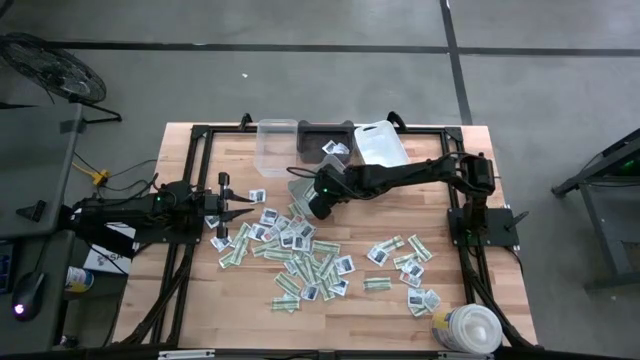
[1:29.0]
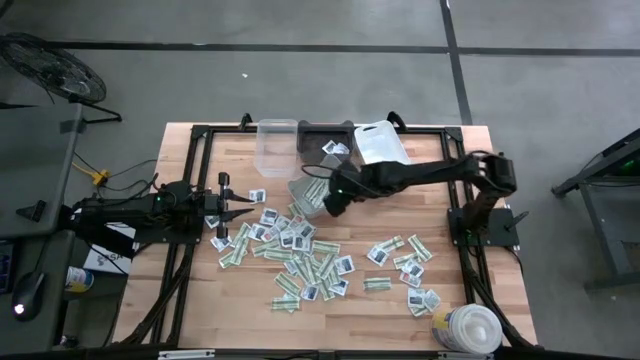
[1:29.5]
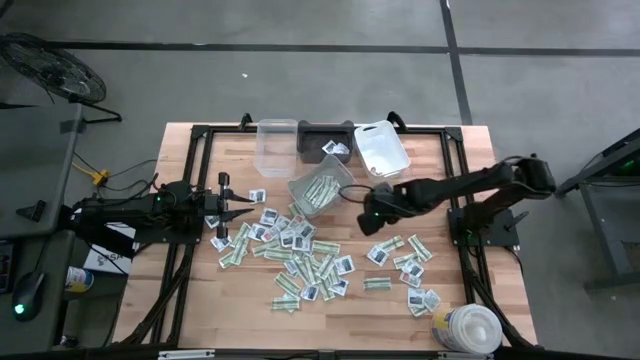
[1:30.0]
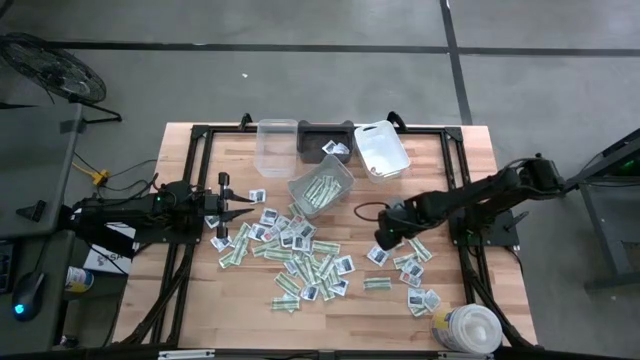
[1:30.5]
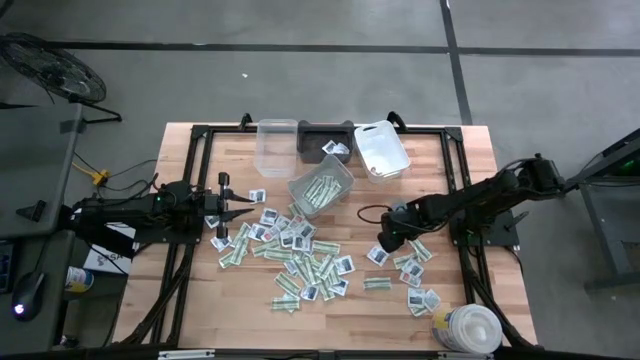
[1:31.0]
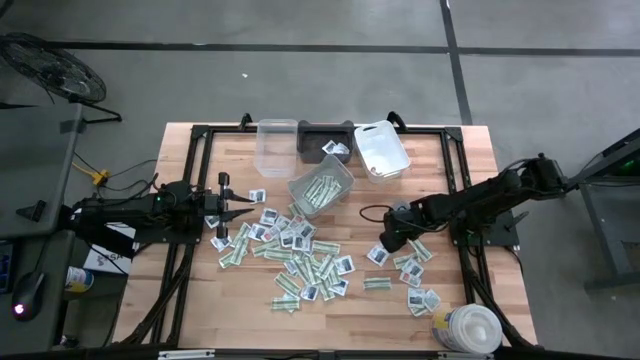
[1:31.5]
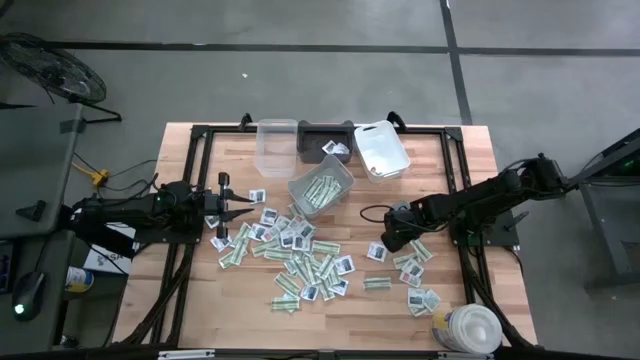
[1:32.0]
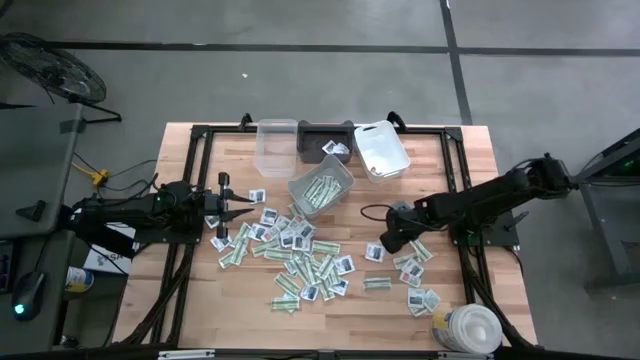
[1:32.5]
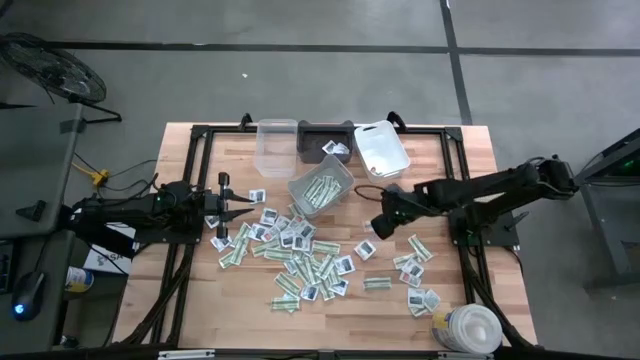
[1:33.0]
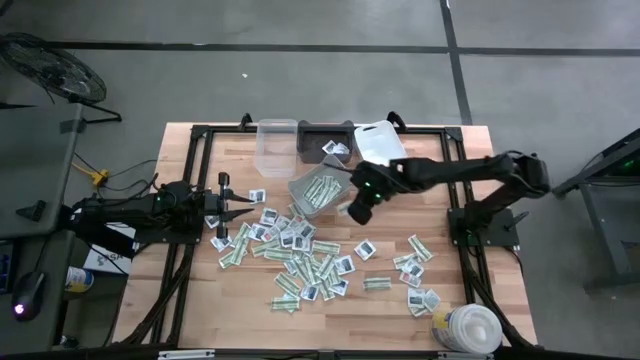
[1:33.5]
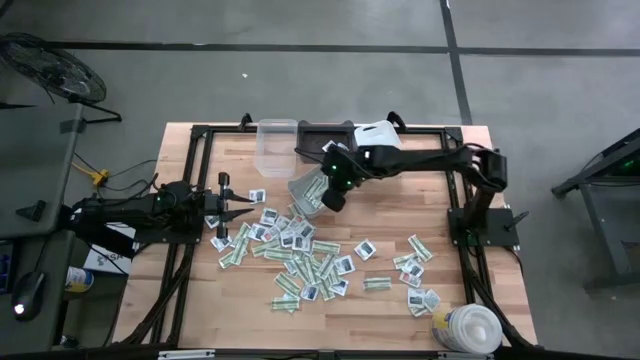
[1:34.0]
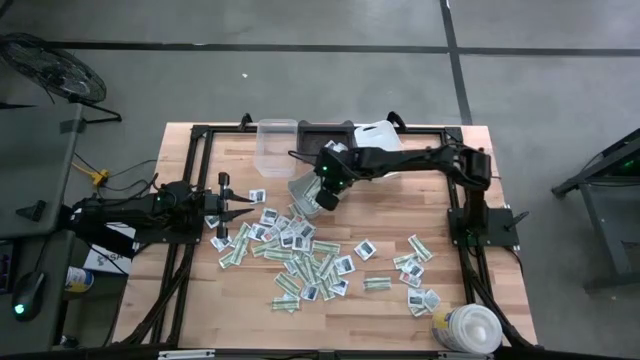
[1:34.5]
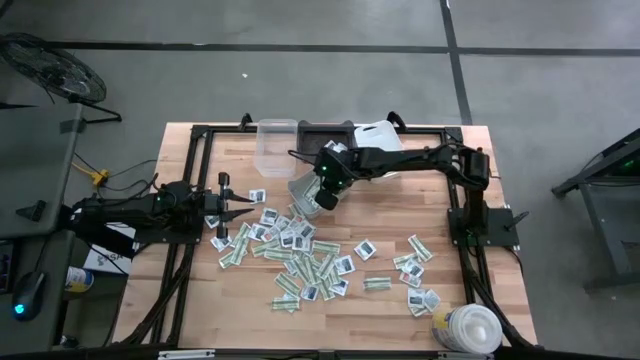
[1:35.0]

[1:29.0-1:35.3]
Task: Pick & Place First Aid Supplies
Put the bandage pack into the gray bin

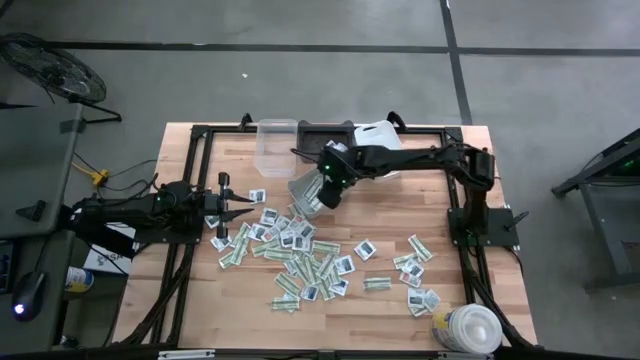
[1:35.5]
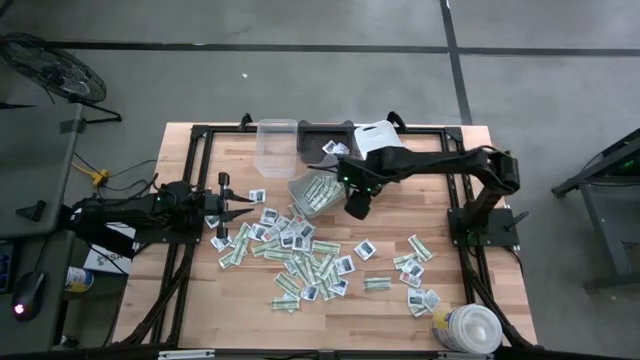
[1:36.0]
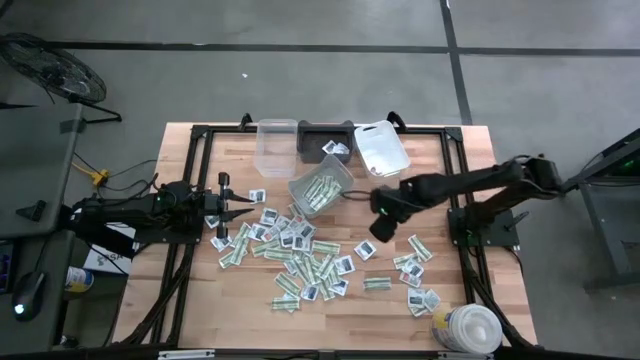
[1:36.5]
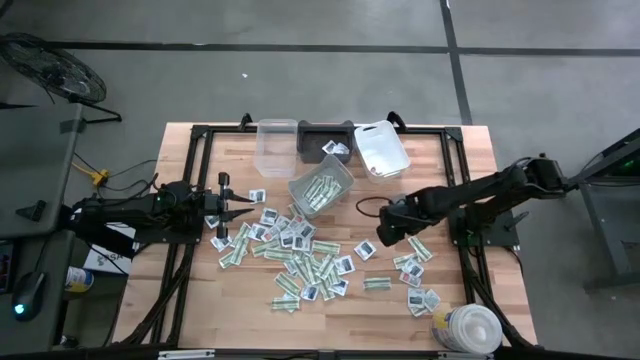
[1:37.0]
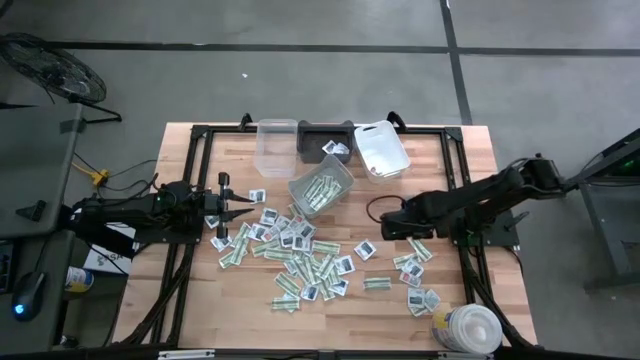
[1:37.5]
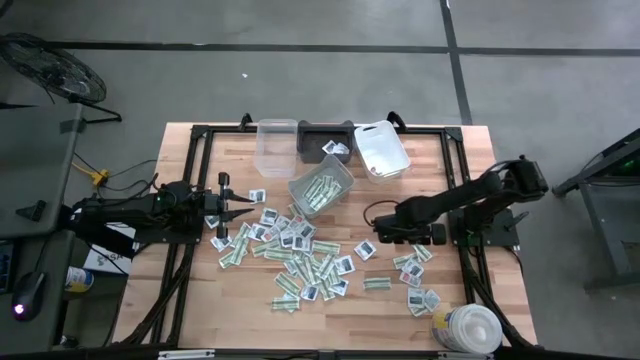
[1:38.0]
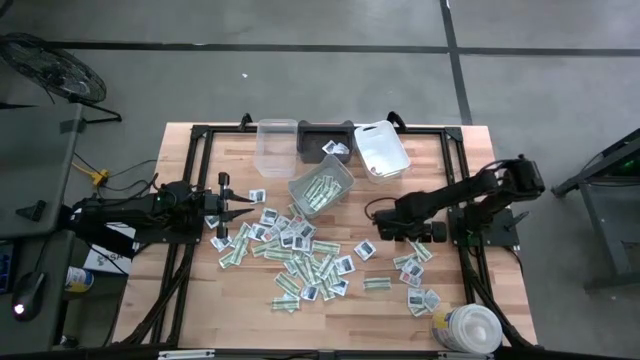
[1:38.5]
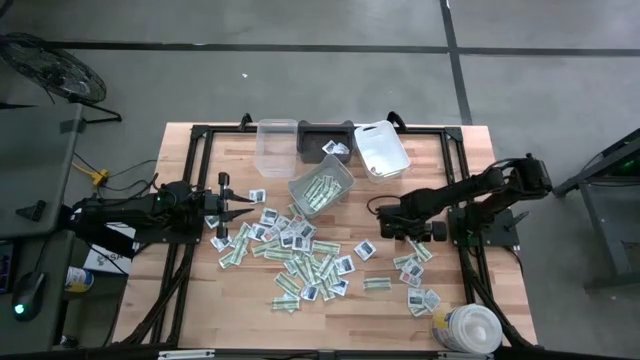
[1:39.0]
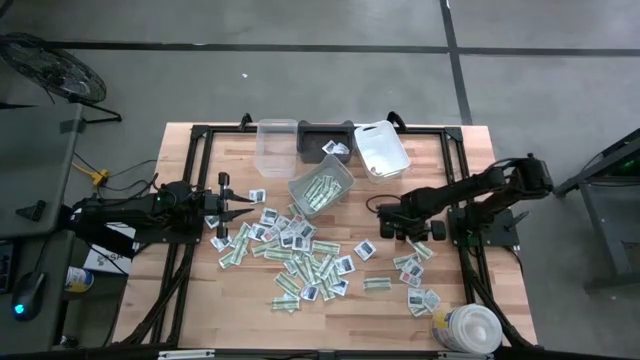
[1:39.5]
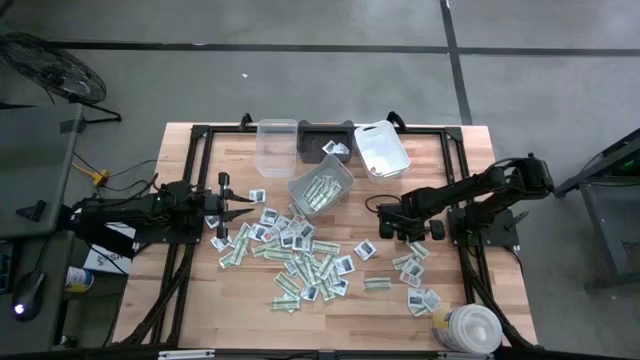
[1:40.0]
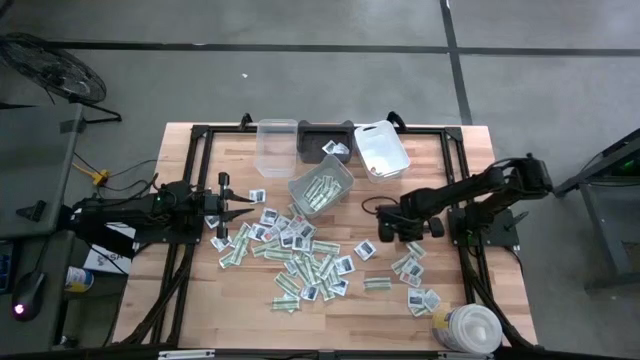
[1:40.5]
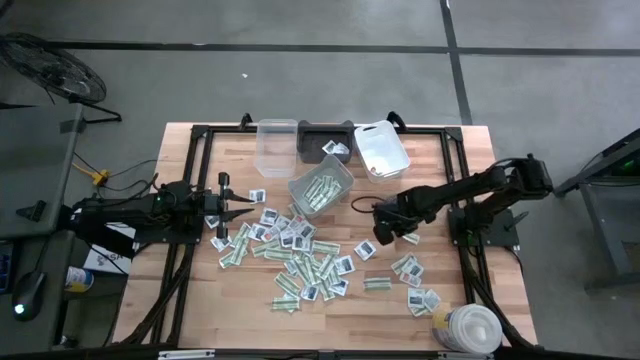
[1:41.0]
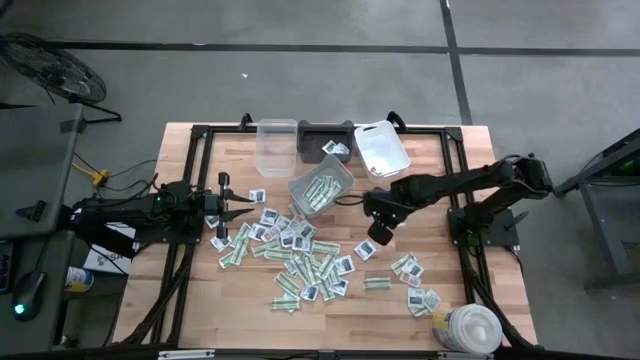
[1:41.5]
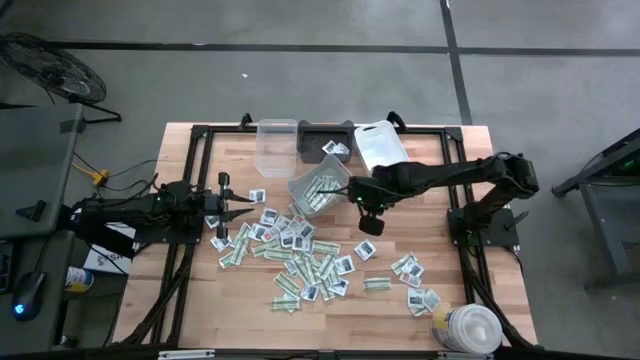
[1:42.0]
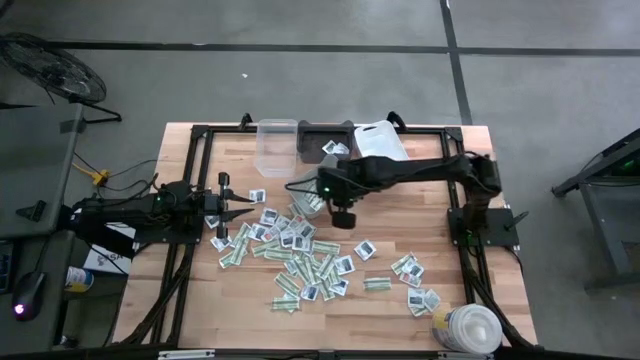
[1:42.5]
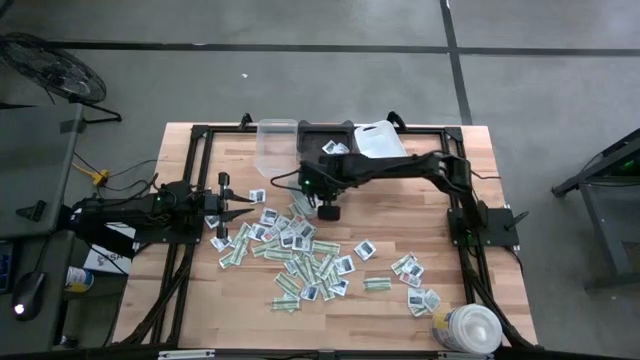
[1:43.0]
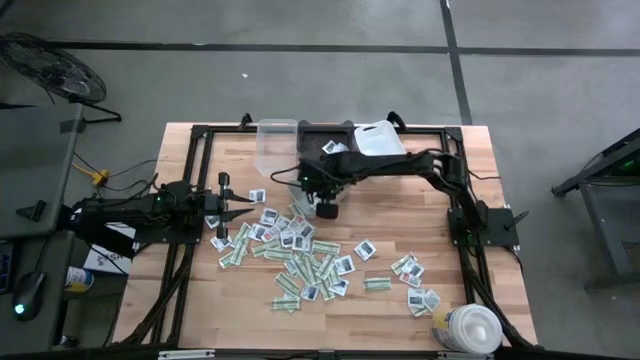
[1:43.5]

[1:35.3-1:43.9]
Put the bandage pack into the gray bin

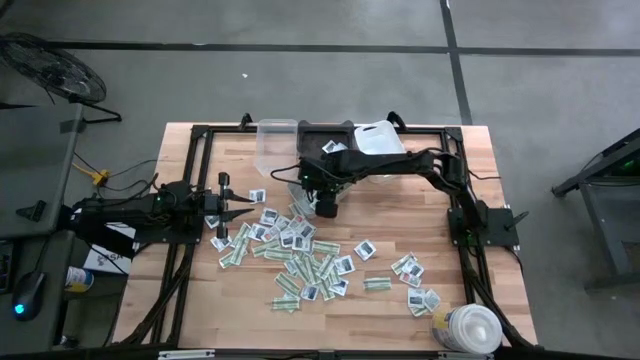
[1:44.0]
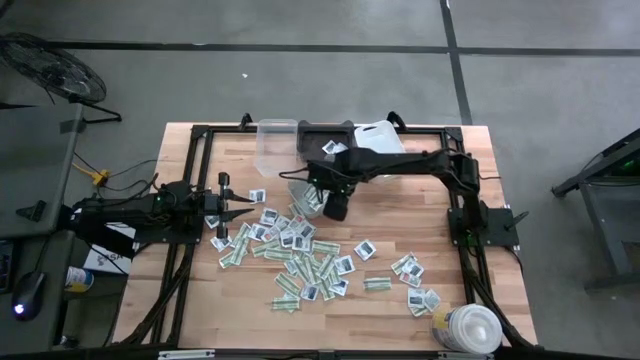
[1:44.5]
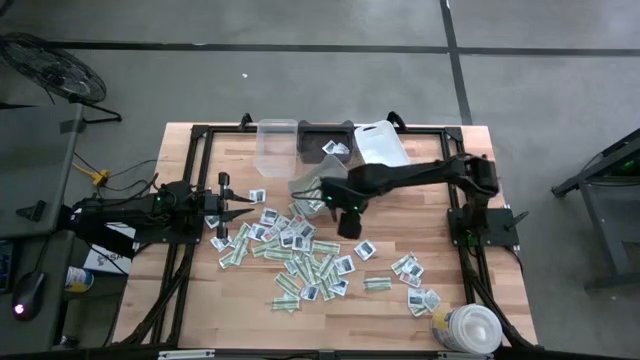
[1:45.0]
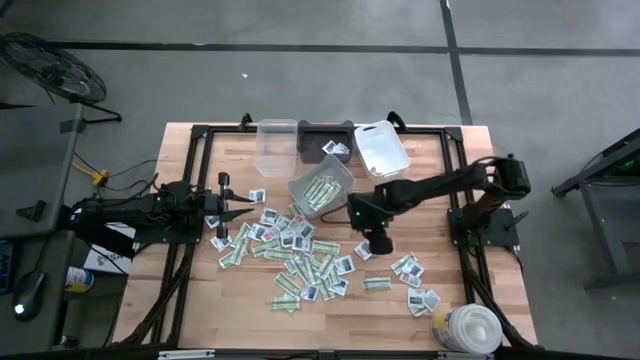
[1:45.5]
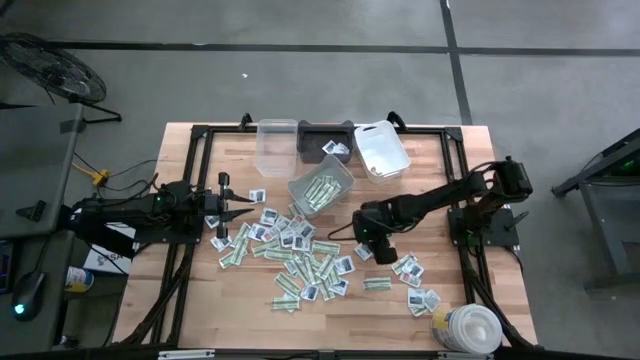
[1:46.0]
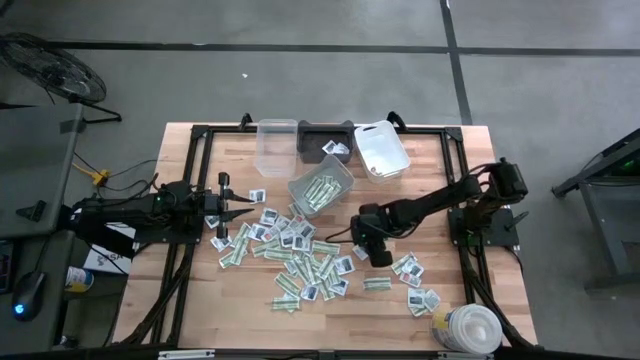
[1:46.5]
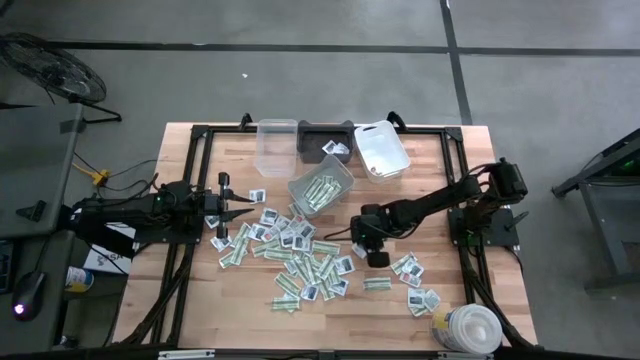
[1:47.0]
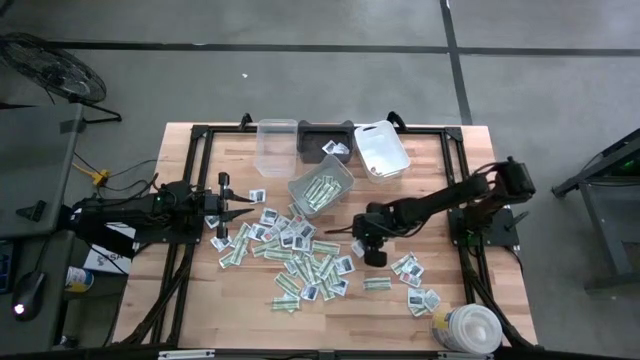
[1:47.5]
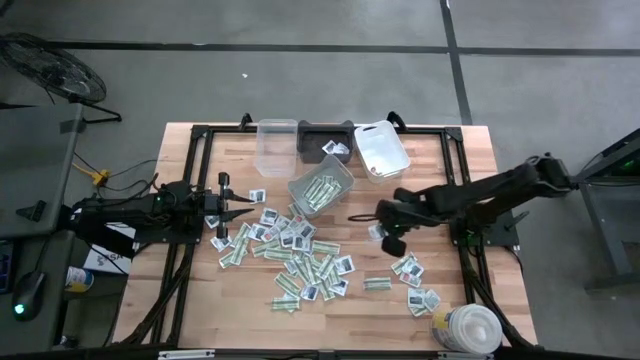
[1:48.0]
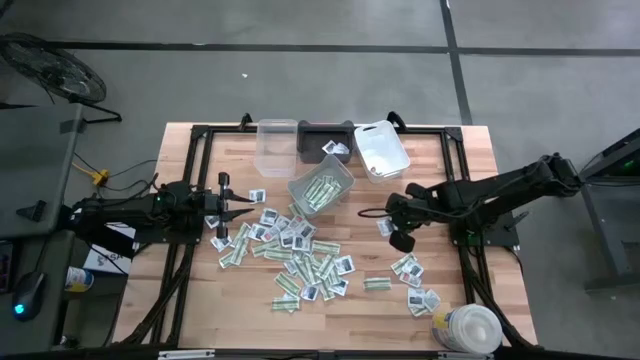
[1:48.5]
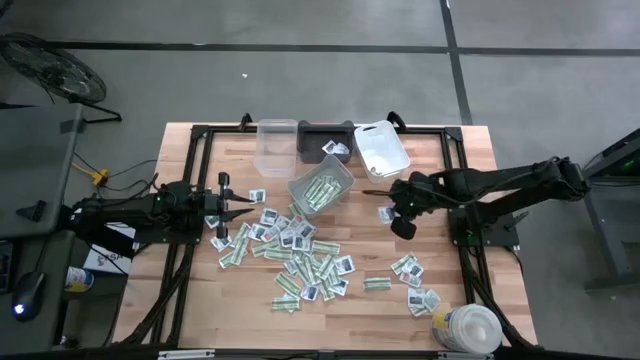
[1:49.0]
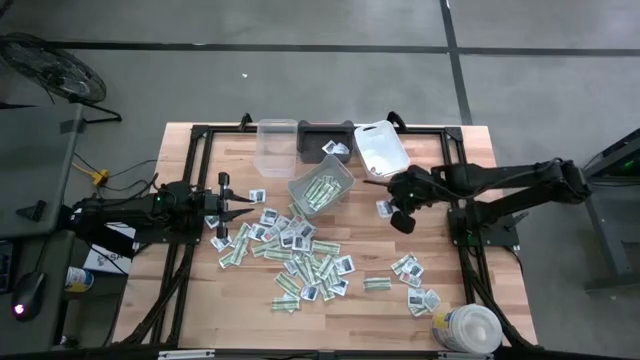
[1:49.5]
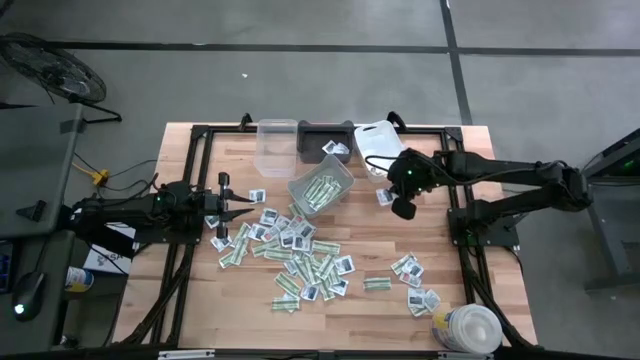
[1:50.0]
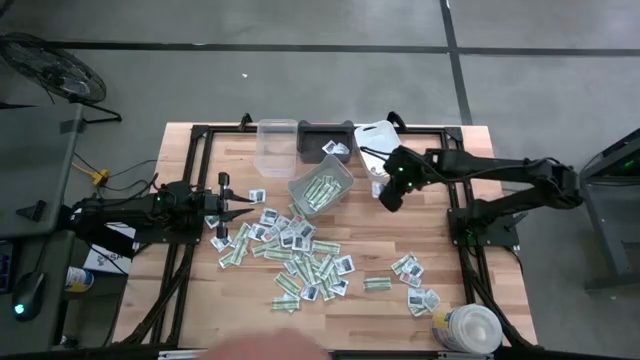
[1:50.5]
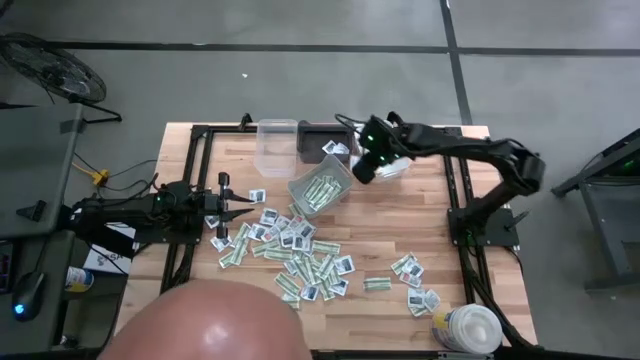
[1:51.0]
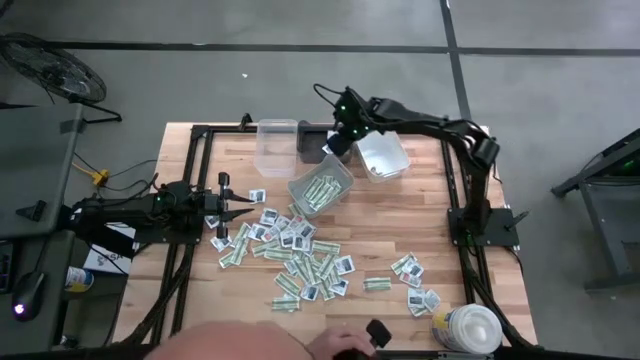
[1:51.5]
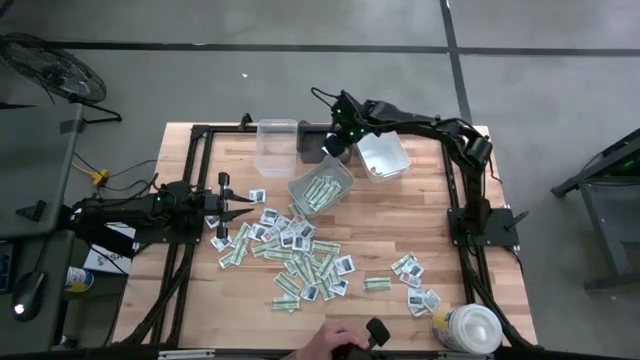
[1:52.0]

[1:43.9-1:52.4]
Put the towelette pack into the black bin
